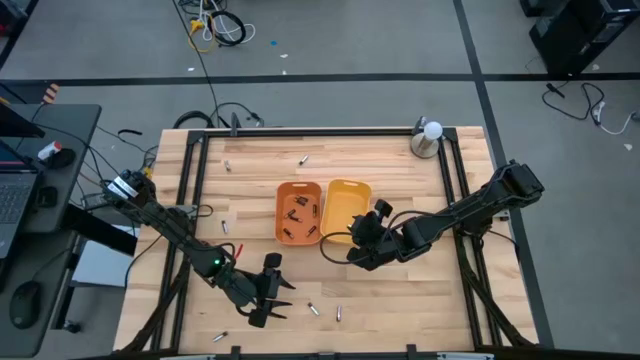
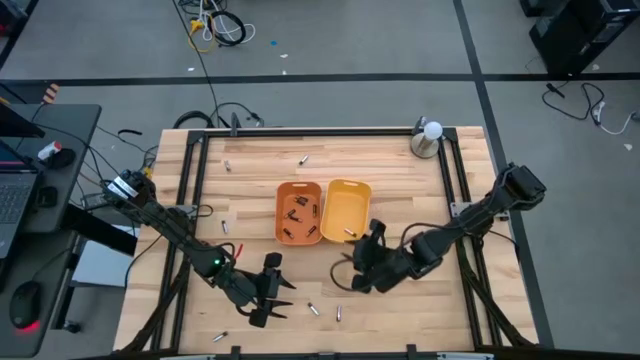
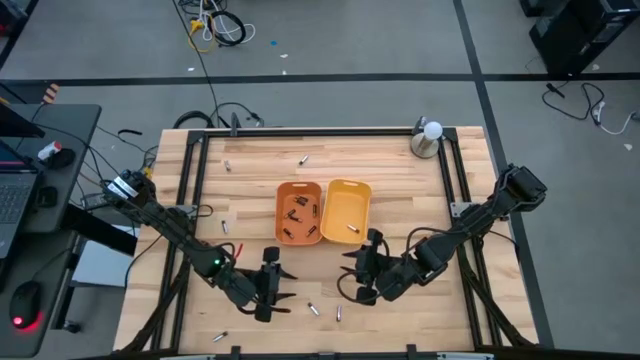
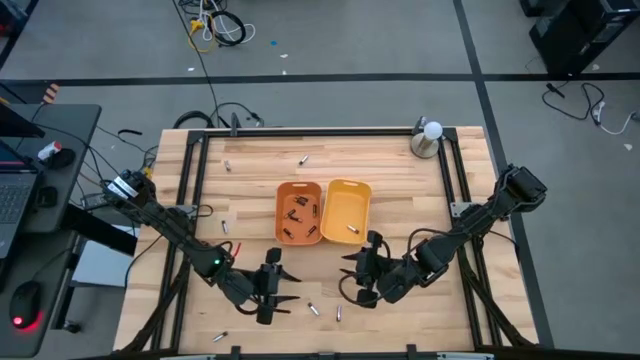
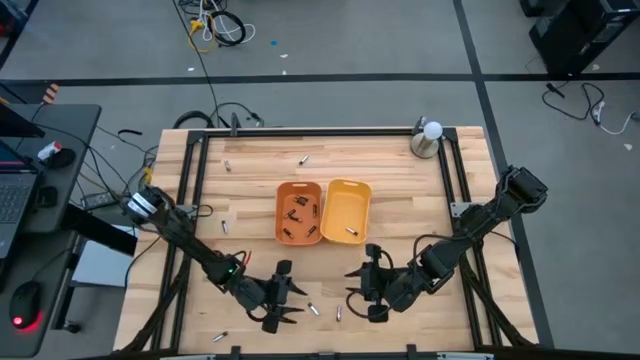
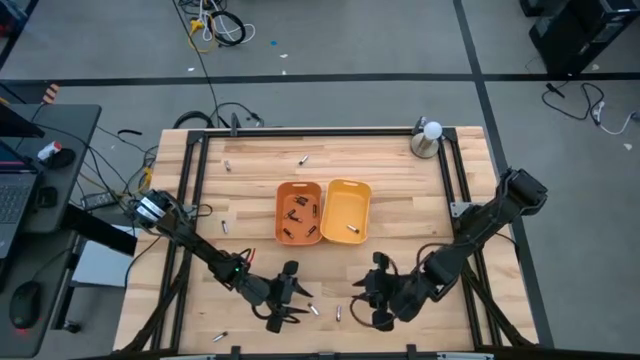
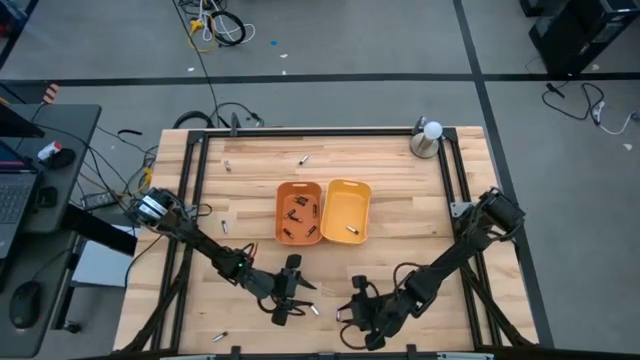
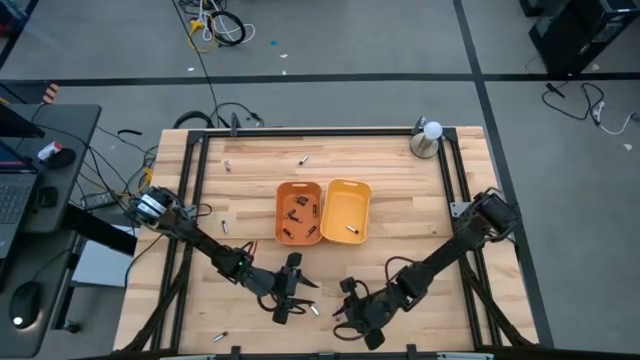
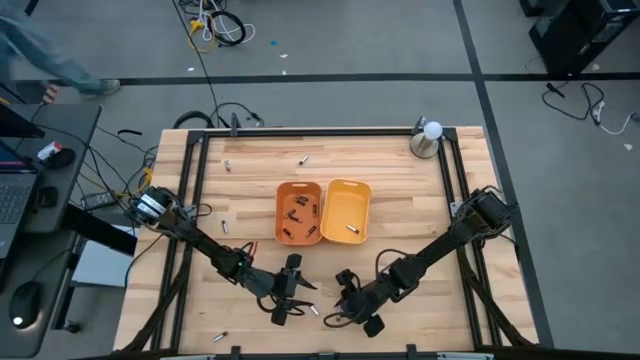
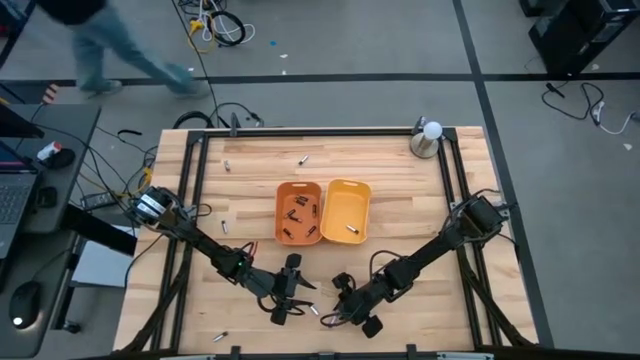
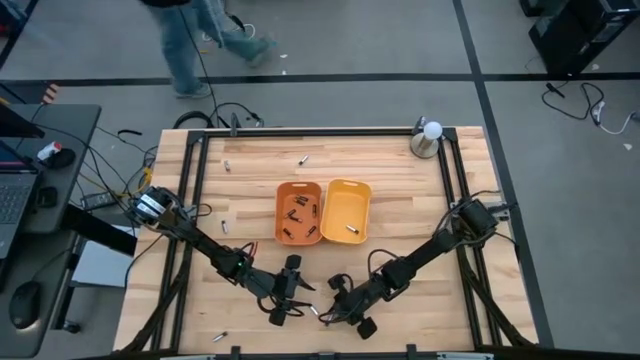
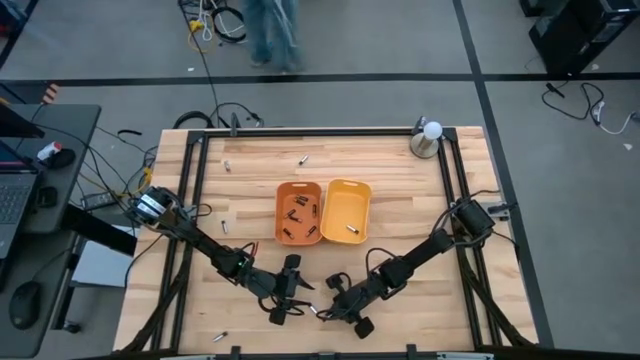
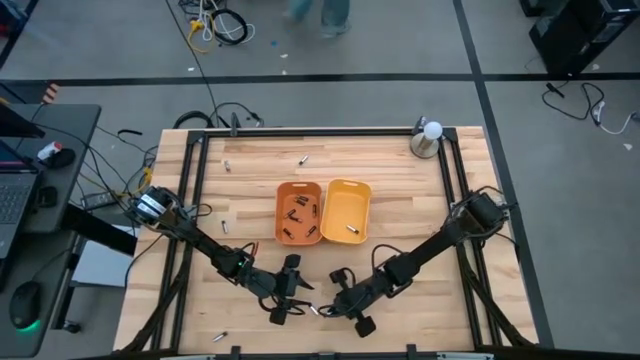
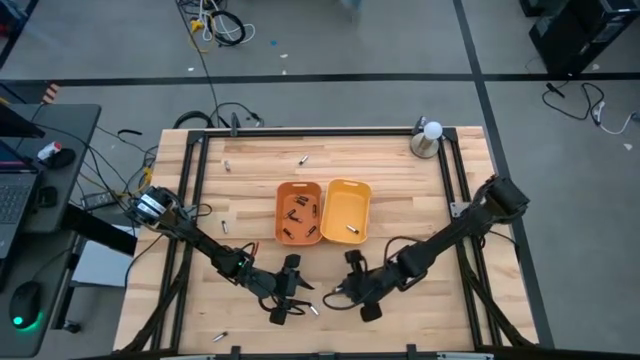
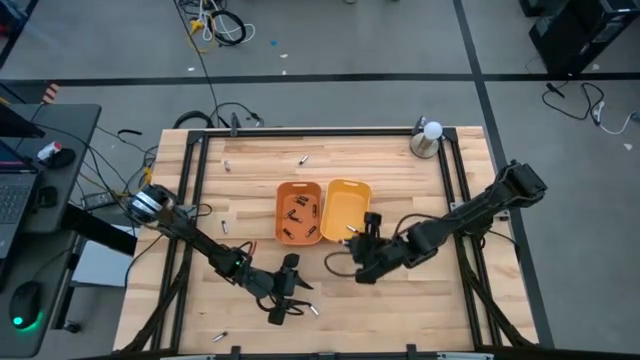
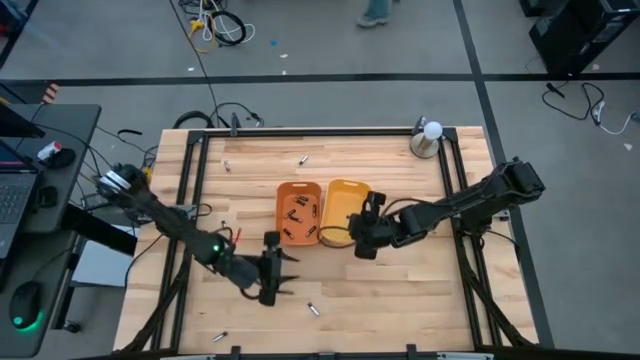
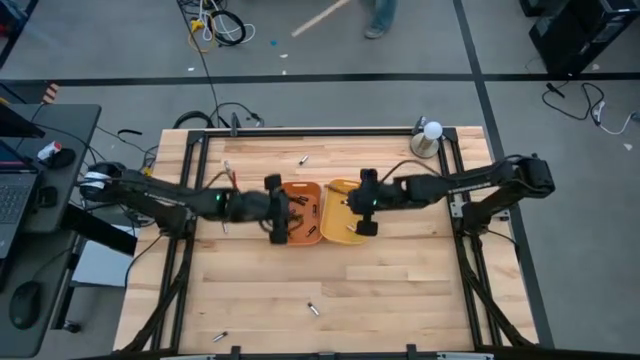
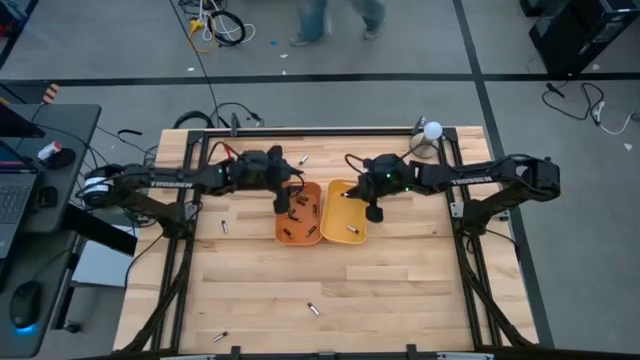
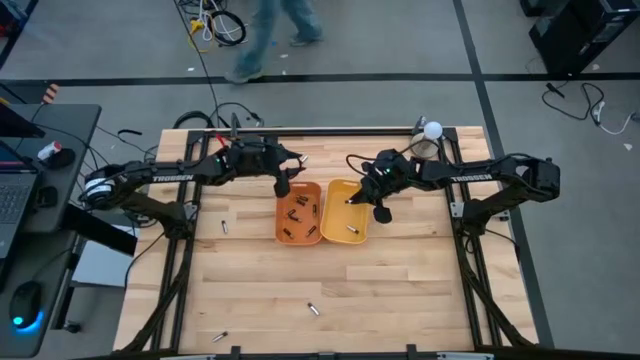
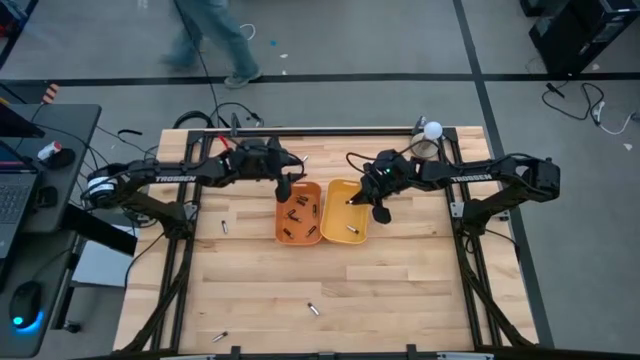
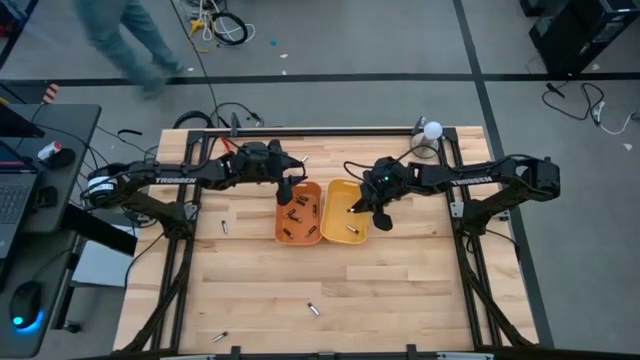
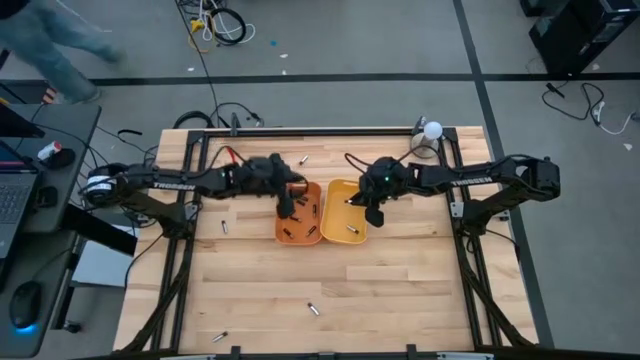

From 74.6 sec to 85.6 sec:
Task: Sort batteries
Put the silver battery into the yellow bin

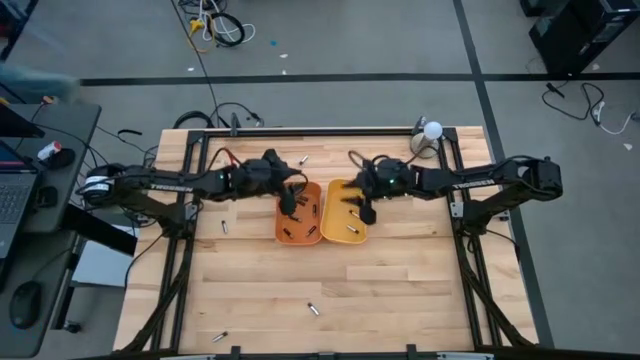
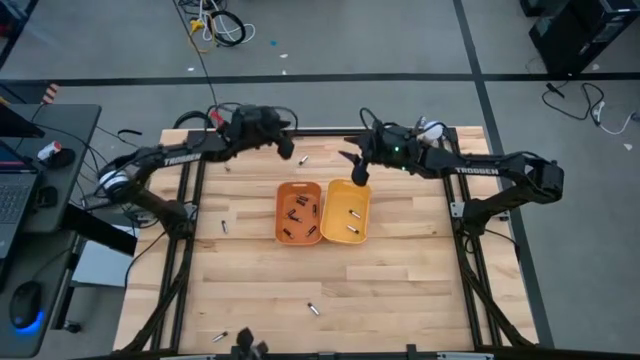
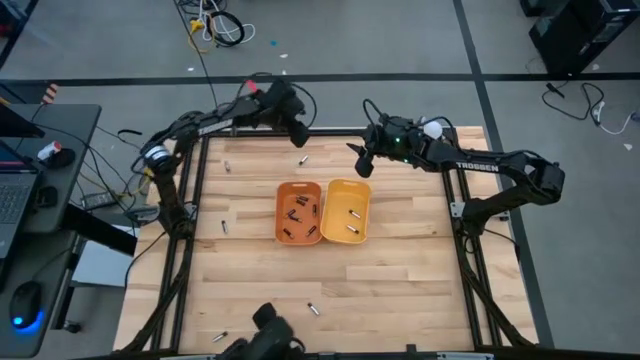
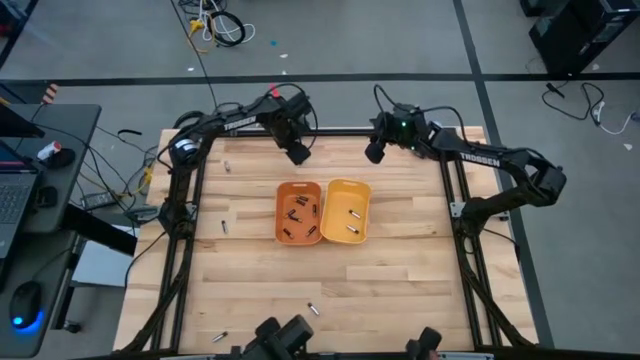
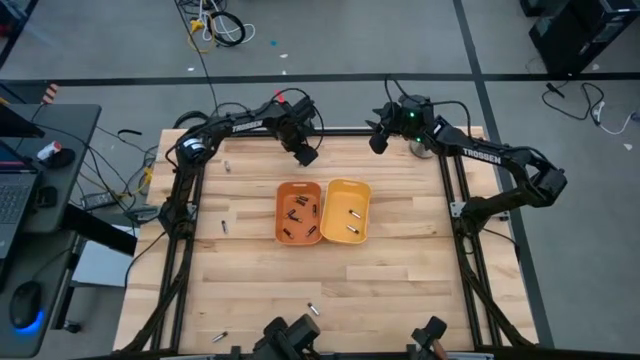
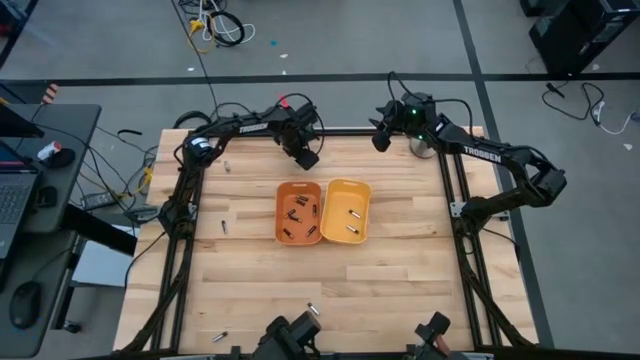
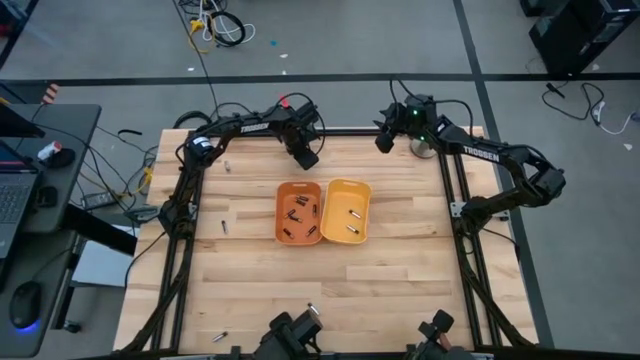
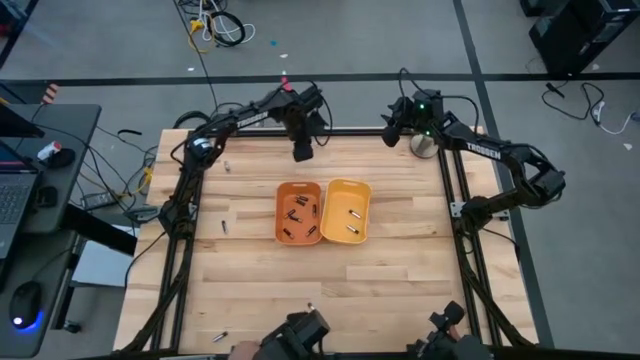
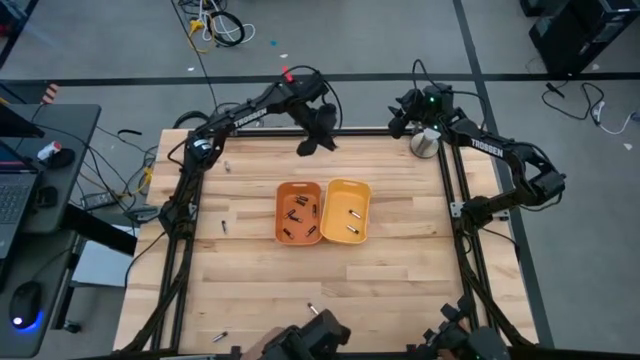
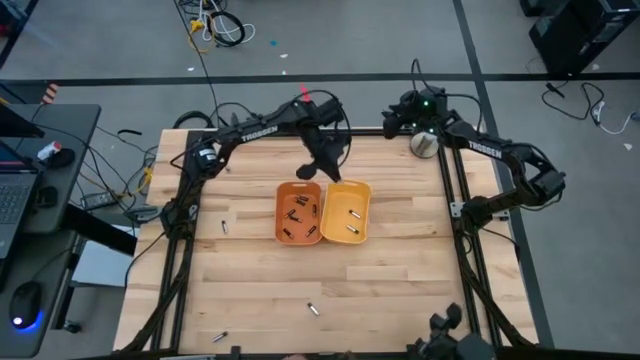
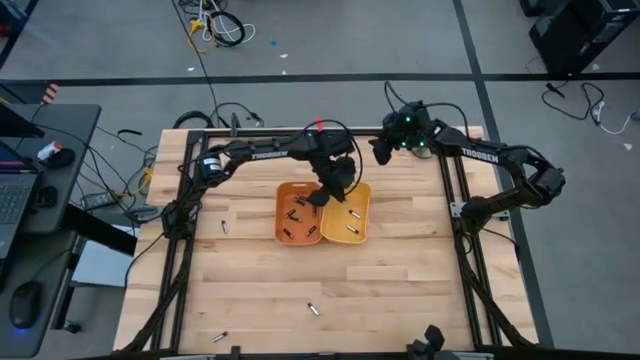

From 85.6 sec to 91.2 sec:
Put the silver battery into the yellow bin

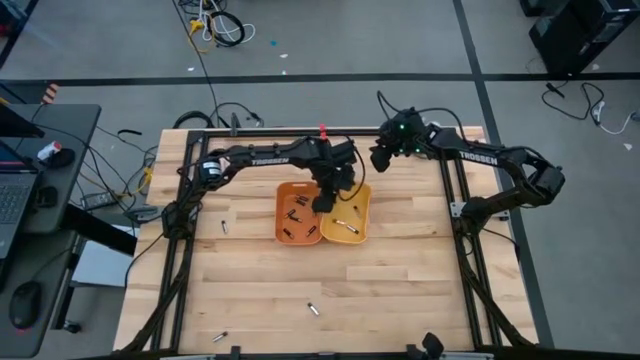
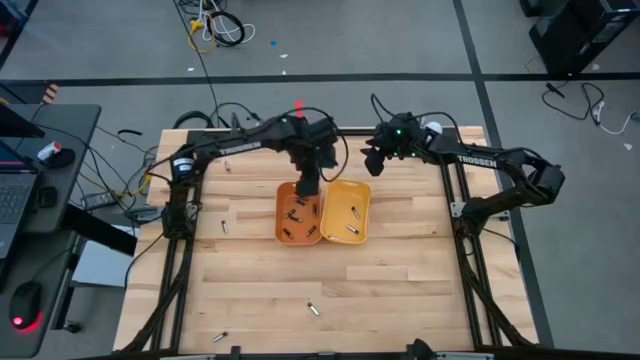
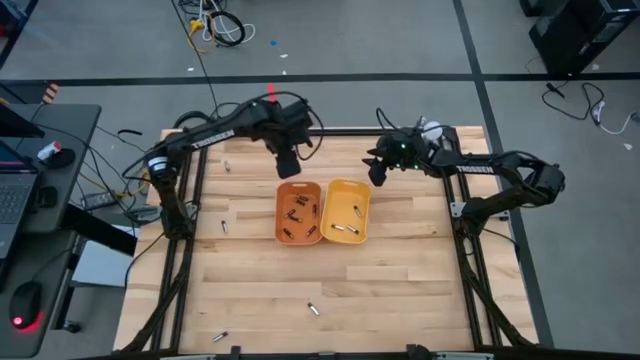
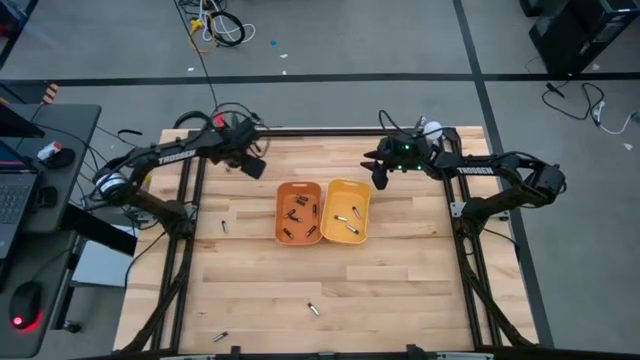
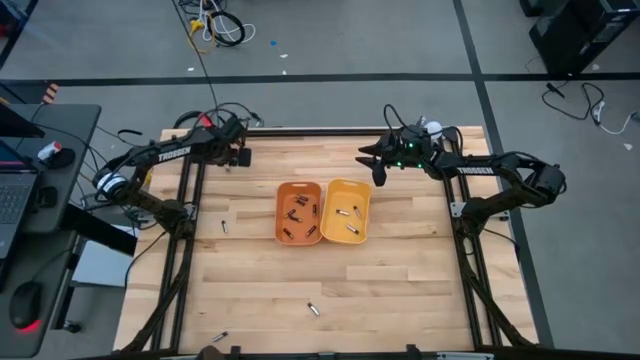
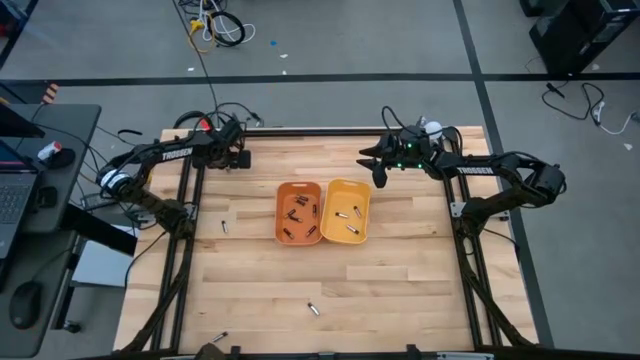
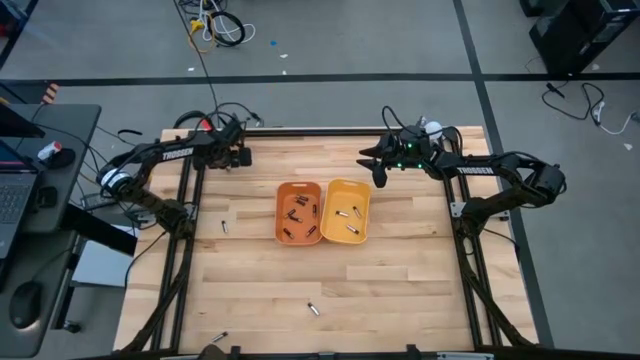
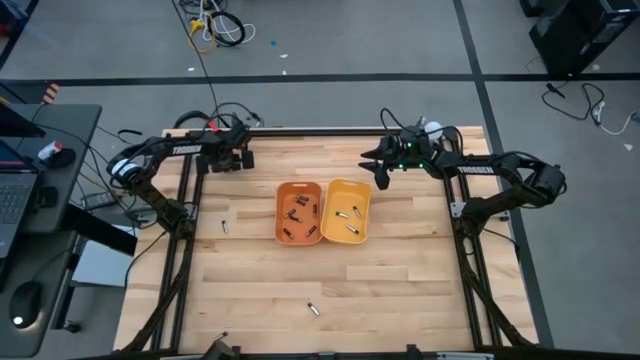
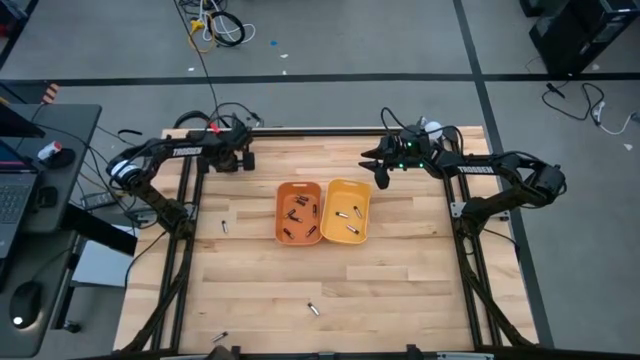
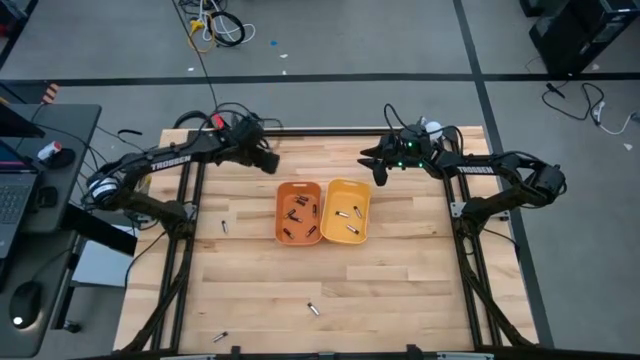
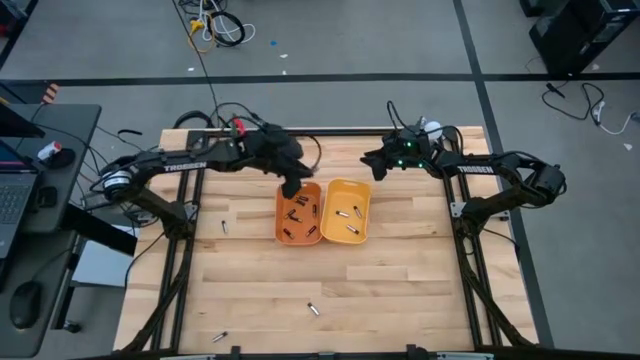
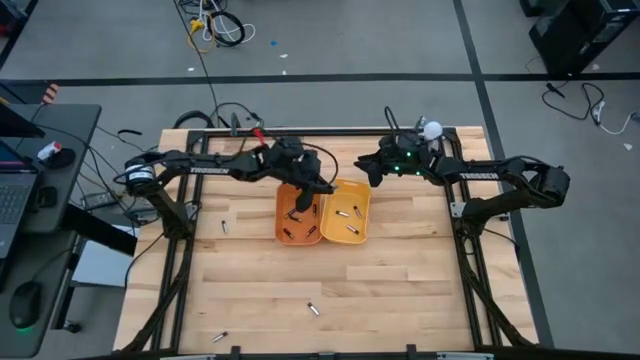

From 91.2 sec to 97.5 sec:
Put the silver battery into the yellow bin

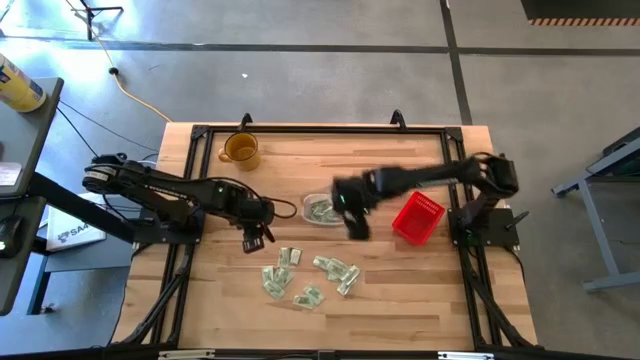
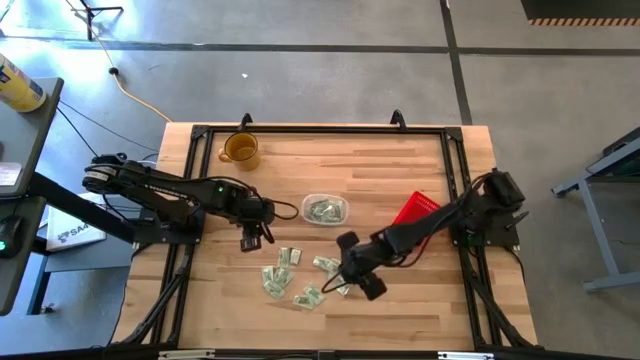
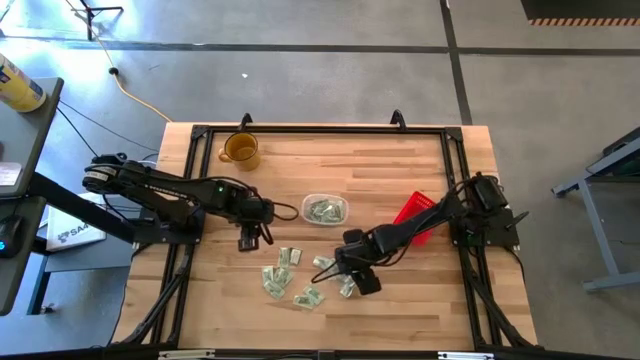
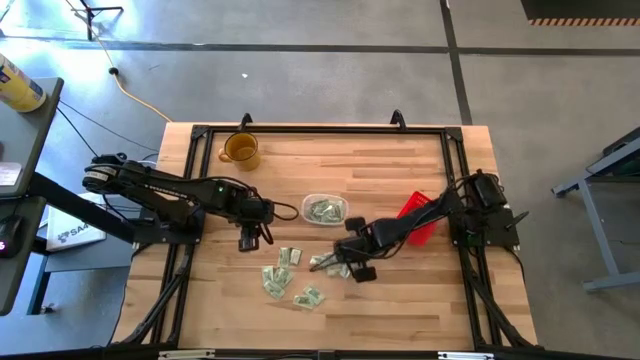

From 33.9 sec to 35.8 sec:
Task: Pick and place items into bin
Put the white stevia packet into the transparent bin
